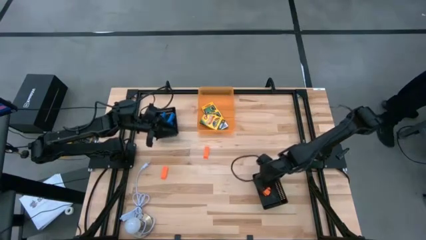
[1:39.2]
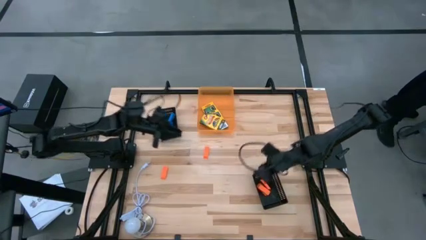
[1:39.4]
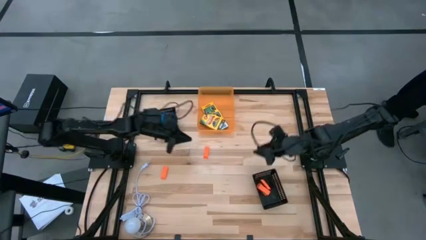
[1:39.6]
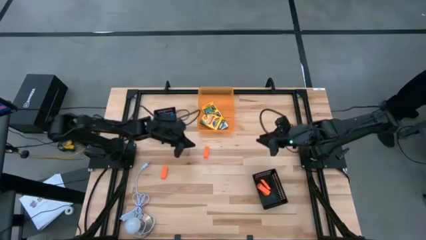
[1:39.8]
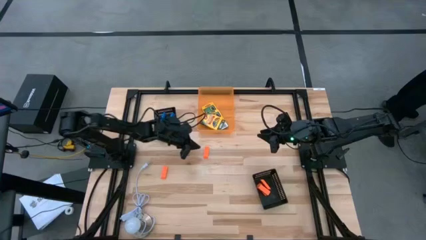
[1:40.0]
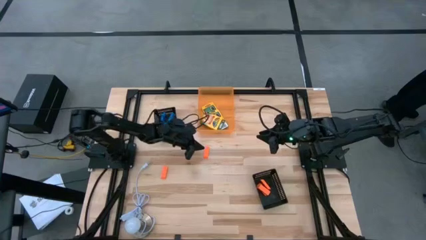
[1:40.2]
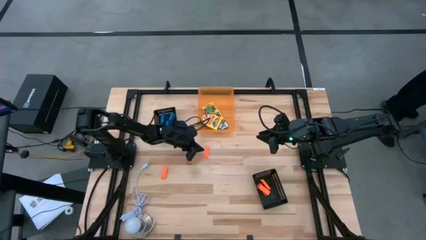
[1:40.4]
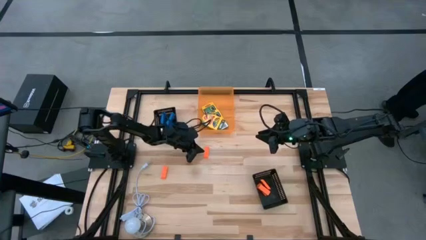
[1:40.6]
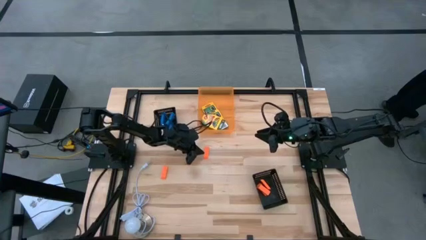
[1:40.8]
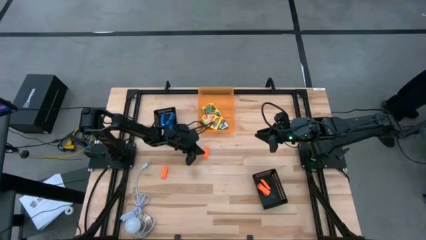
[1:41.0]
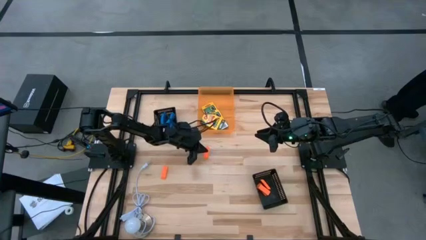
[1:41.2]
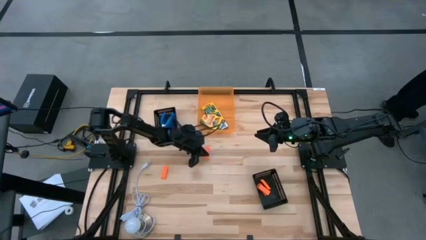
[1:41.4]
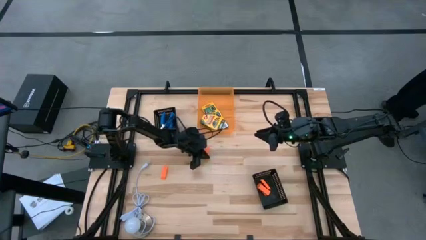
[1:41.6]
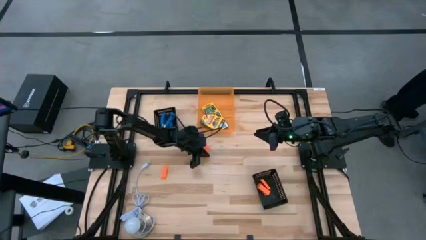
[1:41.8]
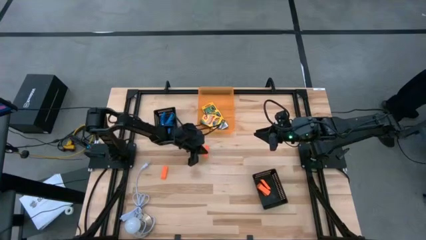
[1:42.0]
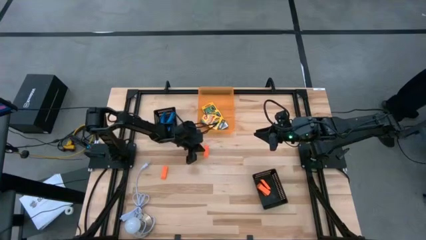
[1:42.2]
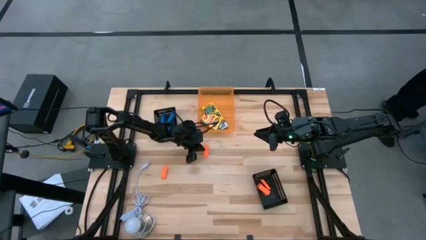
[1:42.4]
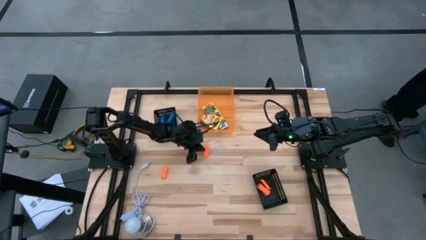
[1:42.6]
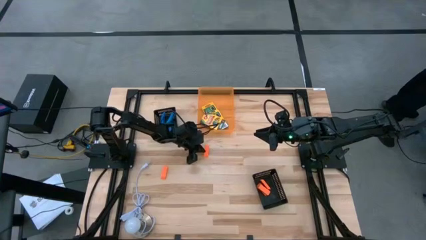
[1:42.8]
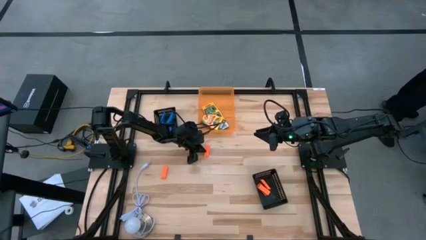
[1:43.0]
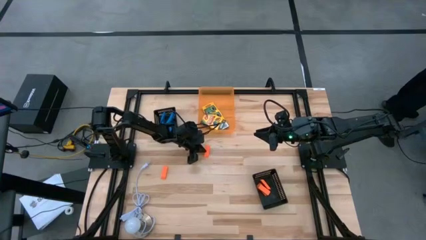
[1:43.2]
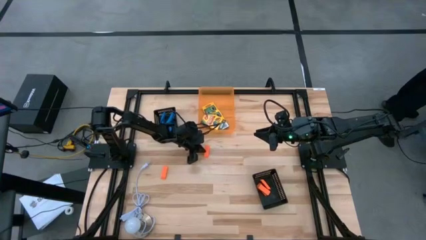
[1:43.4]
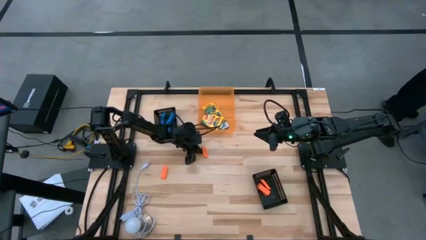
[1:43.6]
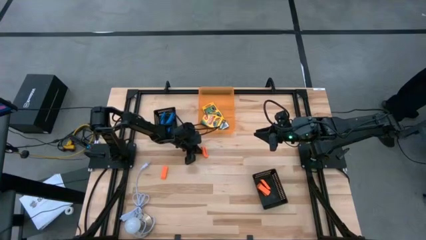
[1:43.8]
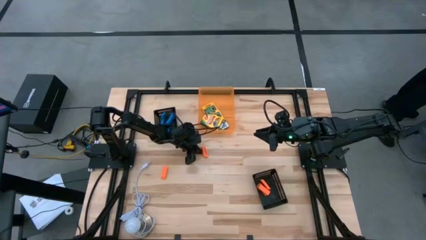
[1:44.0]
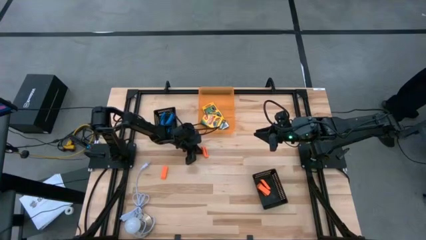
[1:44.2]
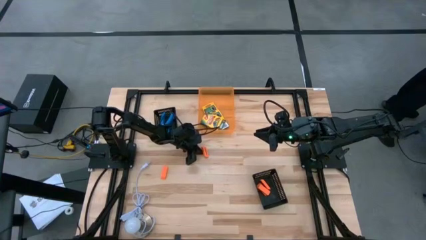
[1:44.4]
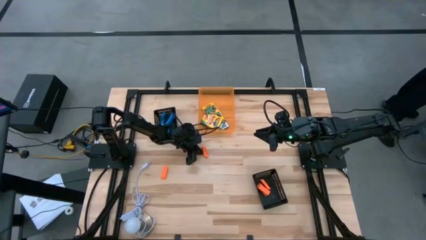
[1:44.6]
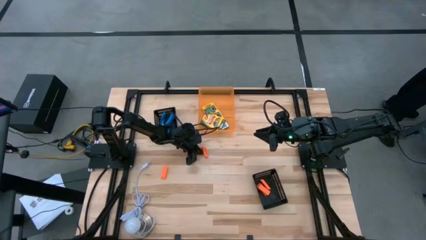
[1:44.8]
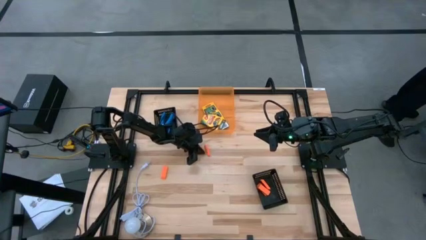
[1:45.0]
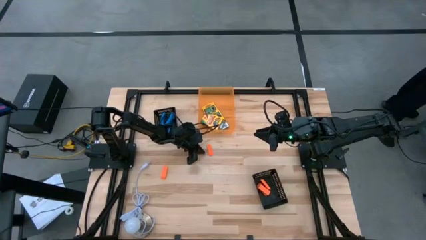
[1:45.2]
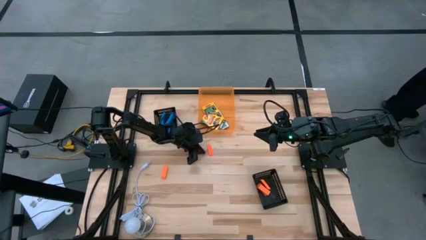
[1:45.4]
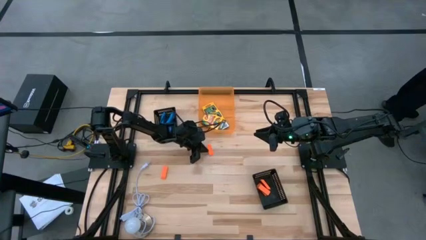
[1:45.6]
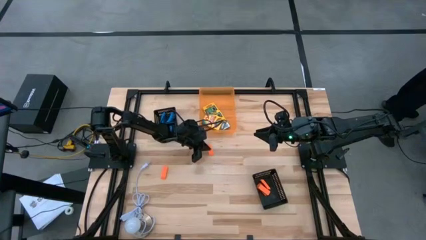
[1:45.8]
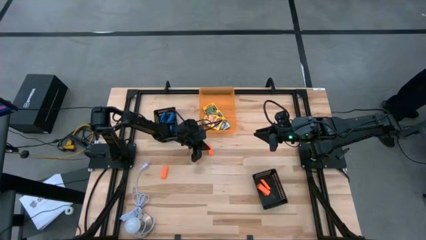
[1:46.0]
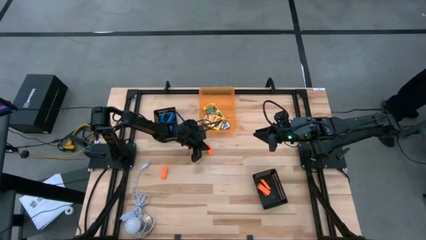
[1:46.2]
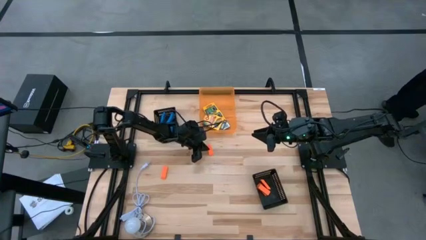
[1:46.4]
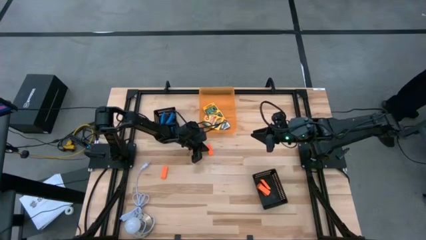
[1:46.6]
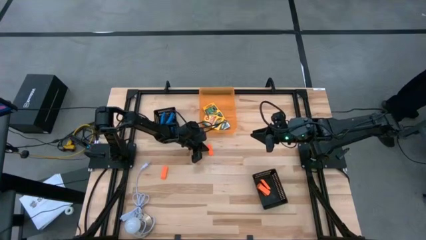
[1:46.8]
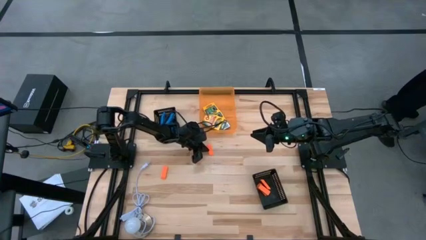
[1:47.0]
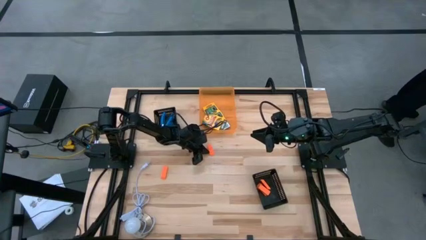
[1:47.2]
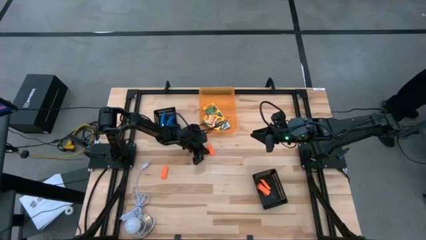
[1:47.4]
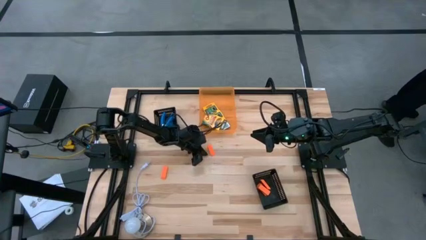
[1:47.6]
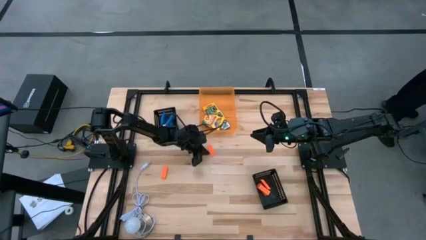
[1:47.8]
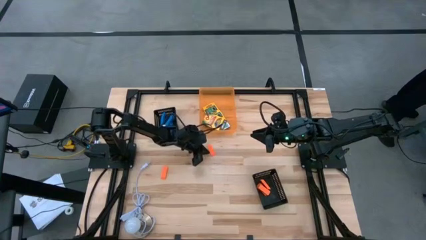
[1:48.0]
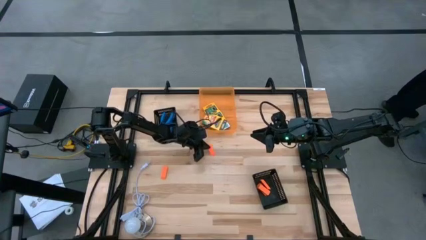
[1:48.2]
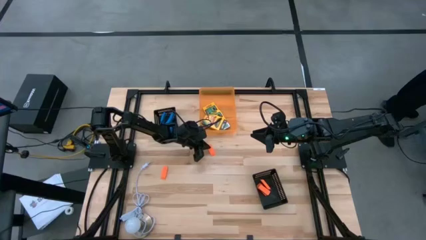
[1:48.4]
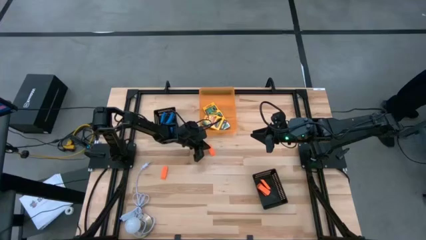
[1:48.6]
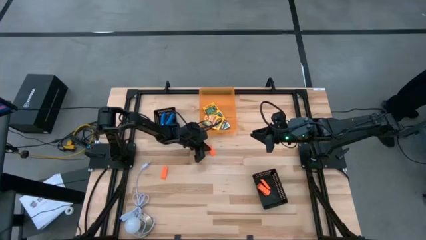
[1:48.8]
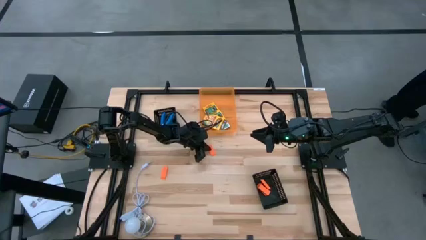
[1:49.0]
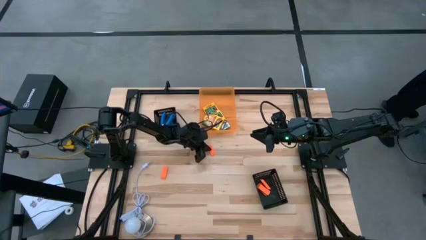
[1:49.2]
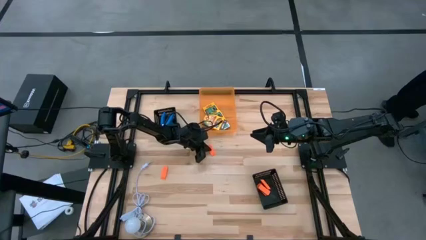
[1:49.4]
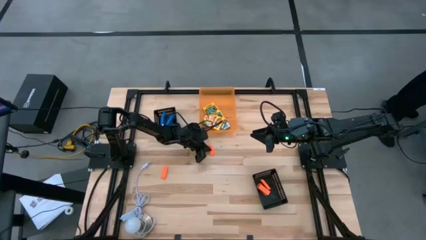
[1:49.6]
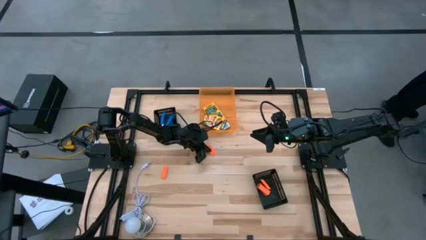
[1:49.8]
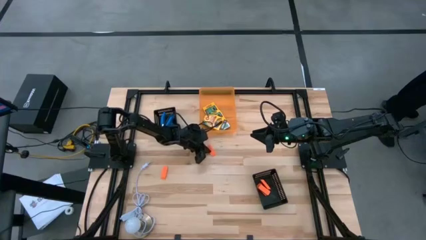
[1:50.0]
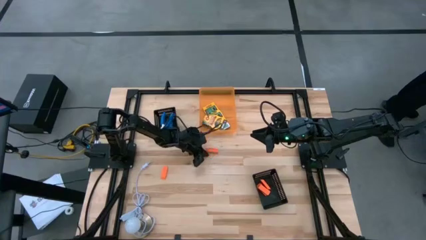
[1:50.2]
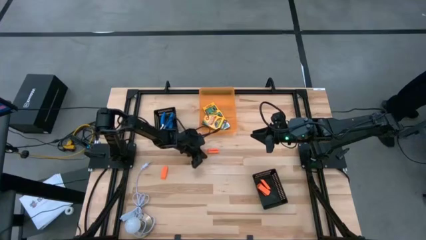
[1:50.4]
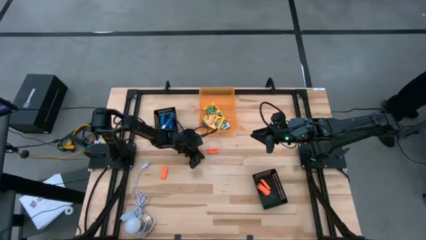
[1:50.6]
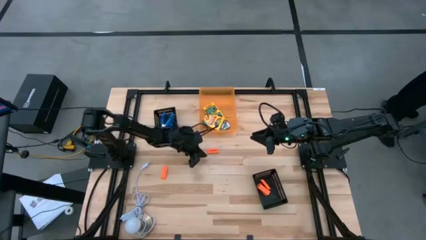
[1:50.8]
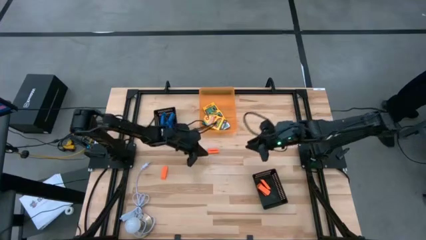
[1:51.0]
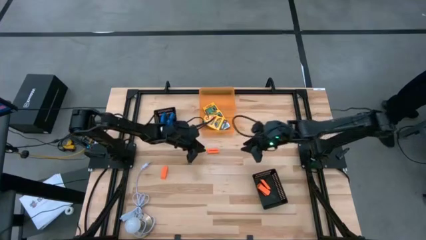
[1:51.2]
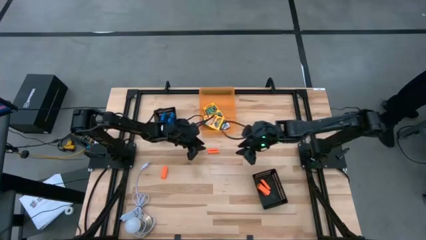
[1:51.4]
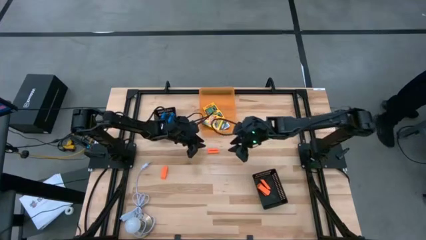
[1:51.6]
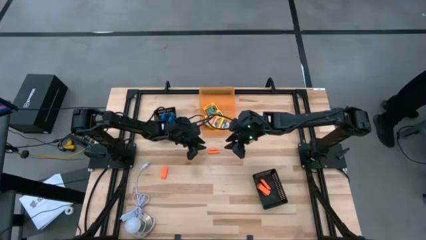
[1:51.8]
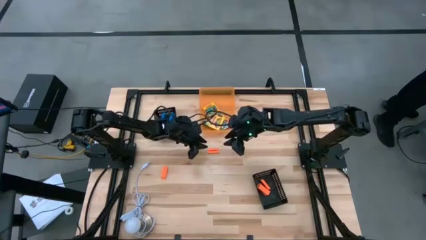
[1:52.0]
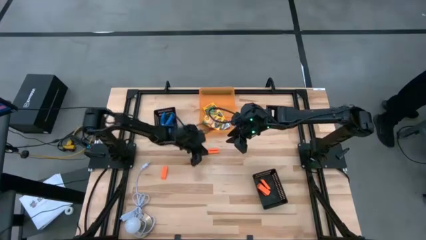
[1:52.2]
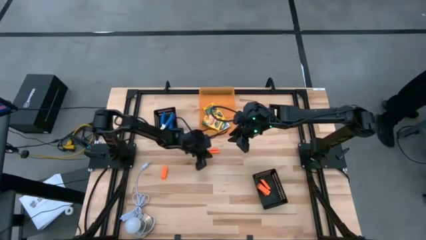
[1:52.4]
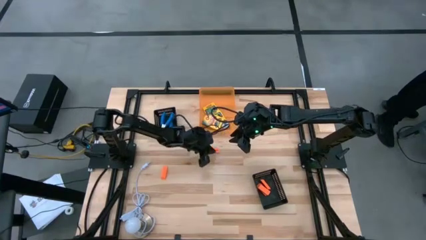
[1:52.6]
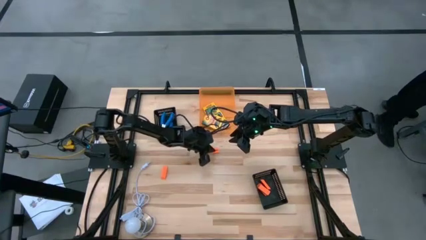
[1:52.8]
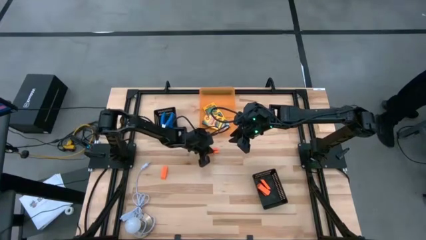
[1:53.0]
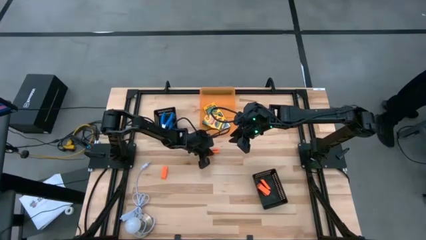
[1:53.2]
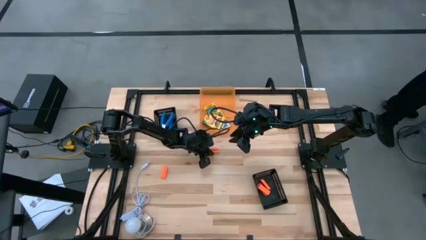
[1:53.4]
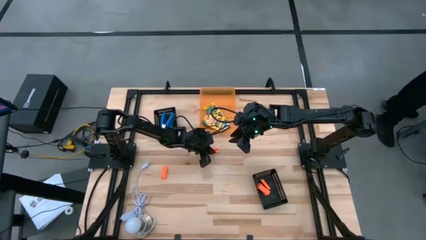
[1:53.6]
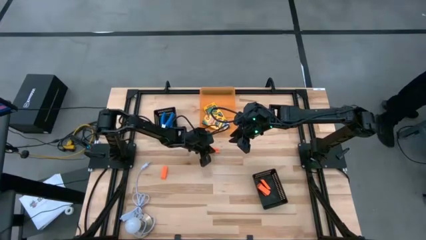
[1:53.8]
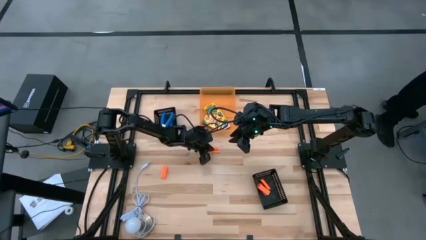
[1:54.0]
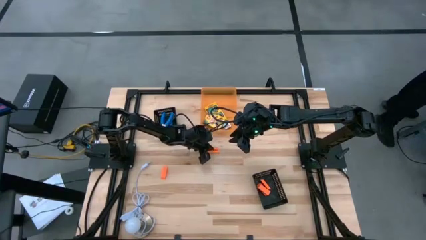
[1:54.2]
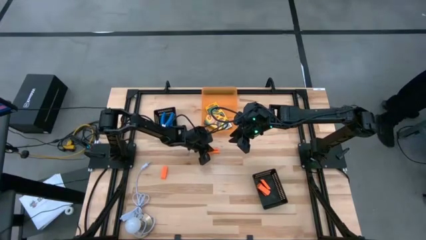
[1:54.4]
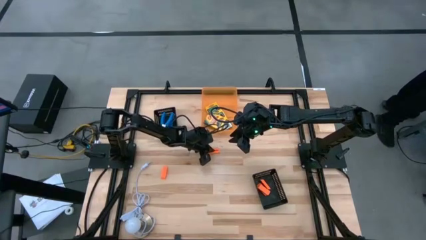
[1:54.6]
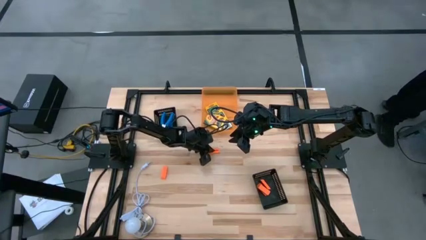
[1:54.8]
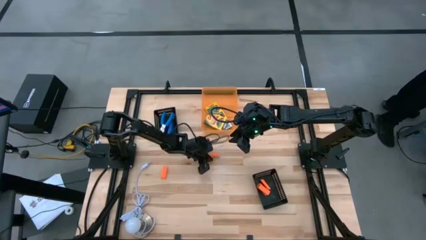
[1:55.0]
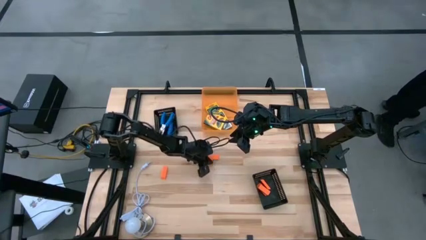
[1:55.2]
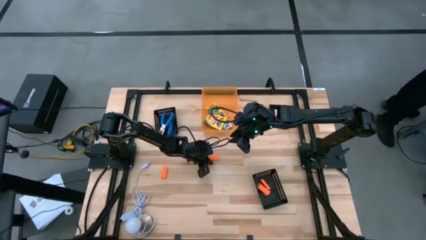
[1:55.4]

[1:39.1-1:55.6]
Task: Pick & Place School Supplies
Put the orange eraser into the bottom black bin
